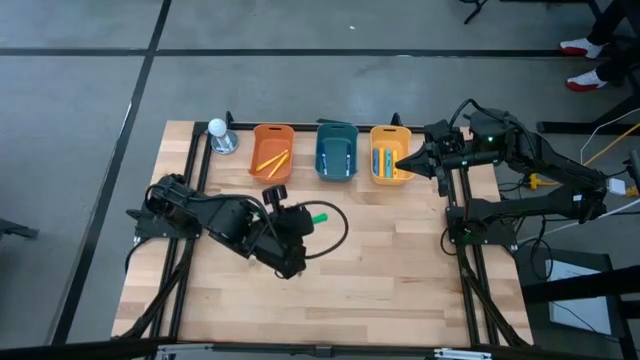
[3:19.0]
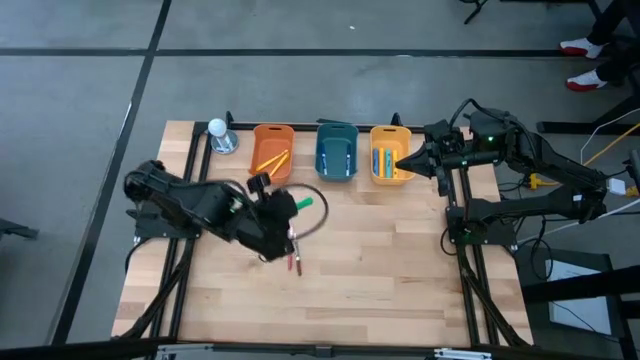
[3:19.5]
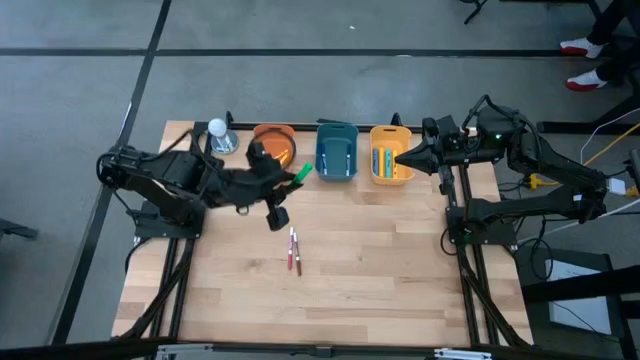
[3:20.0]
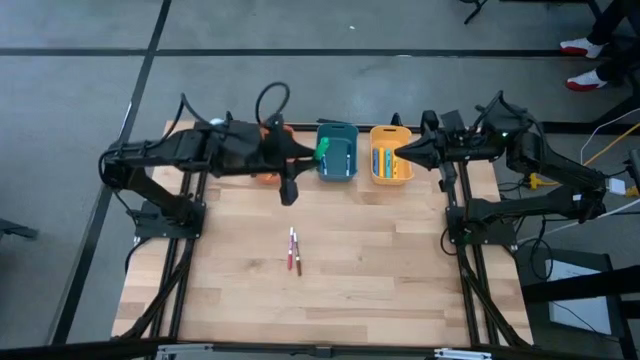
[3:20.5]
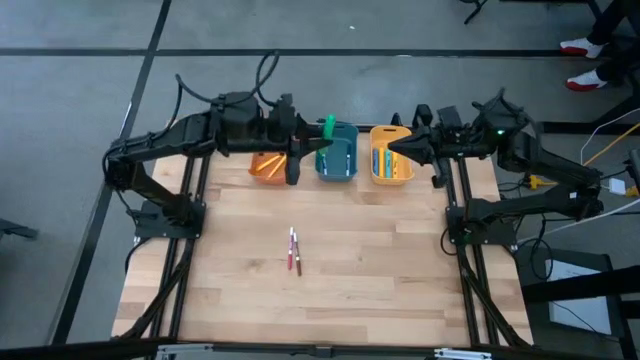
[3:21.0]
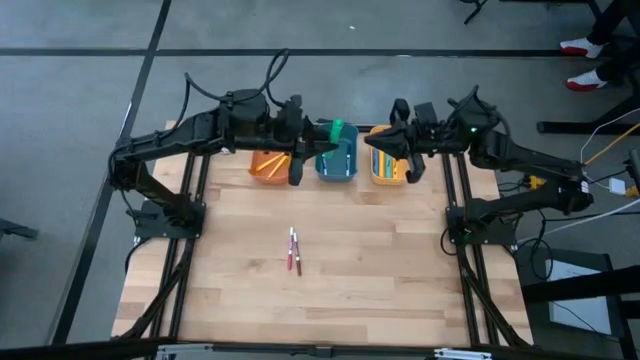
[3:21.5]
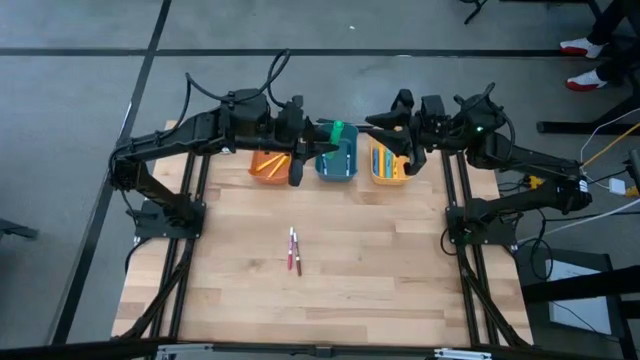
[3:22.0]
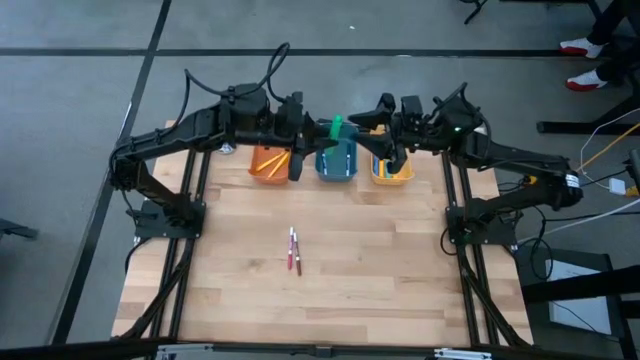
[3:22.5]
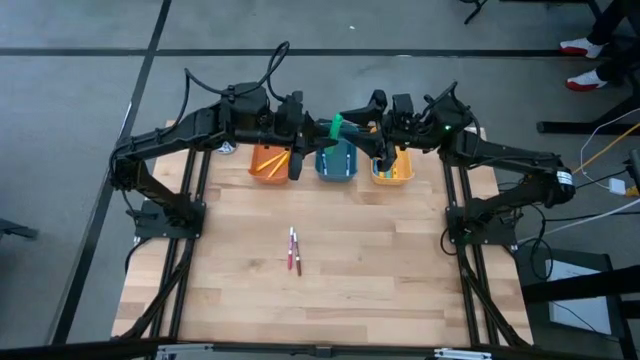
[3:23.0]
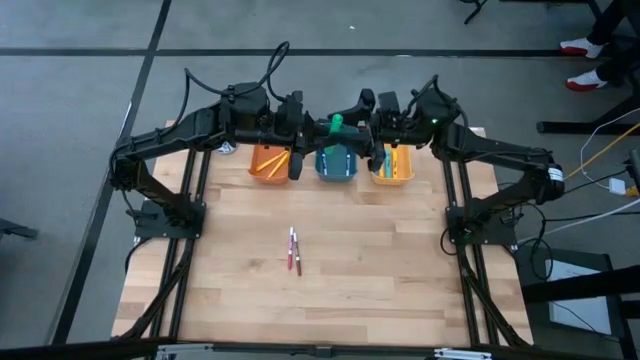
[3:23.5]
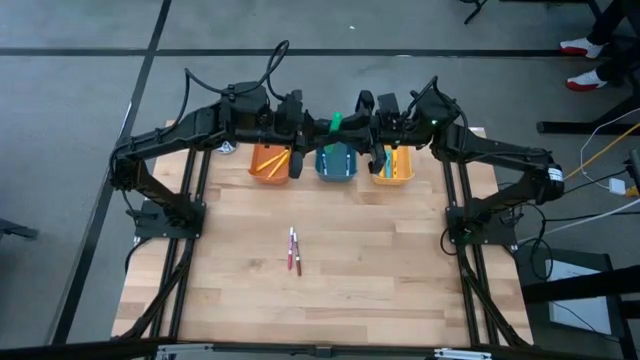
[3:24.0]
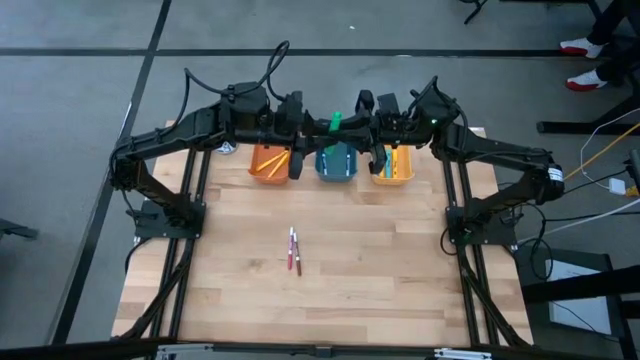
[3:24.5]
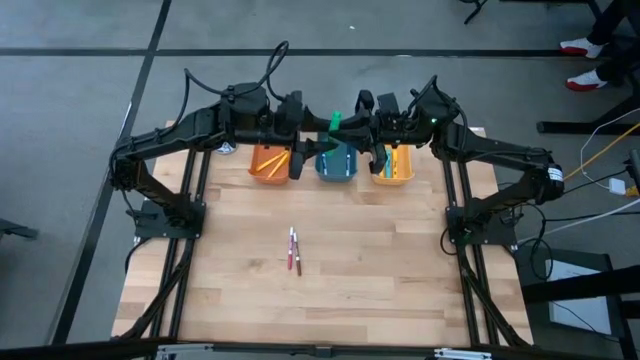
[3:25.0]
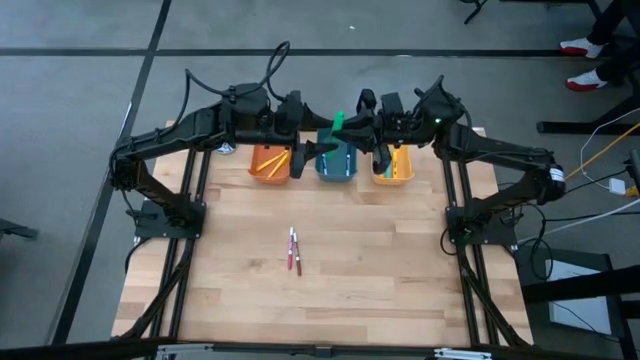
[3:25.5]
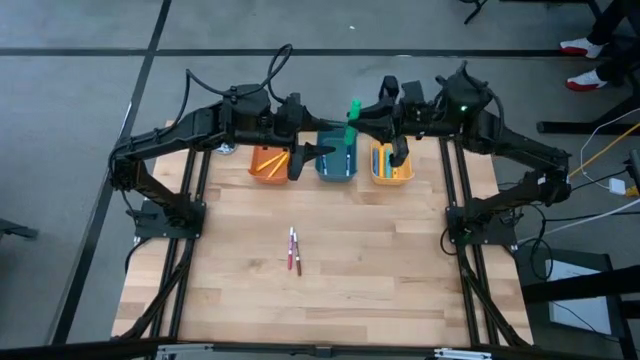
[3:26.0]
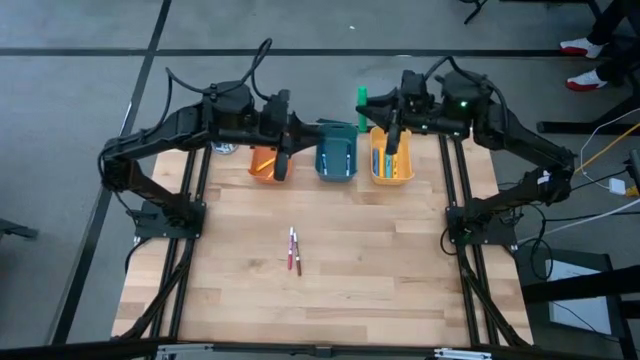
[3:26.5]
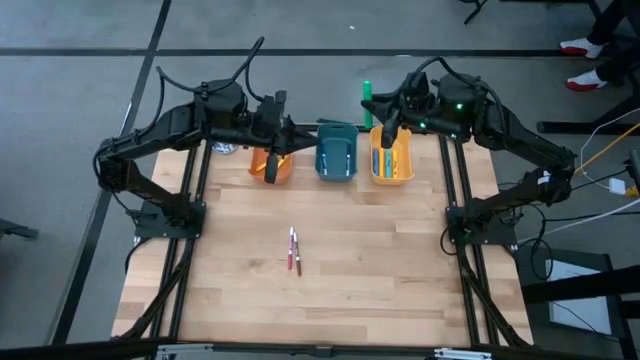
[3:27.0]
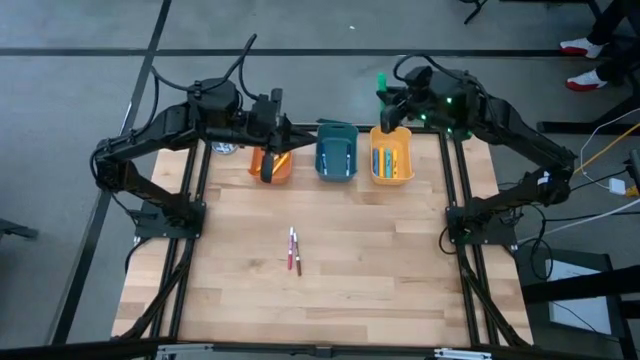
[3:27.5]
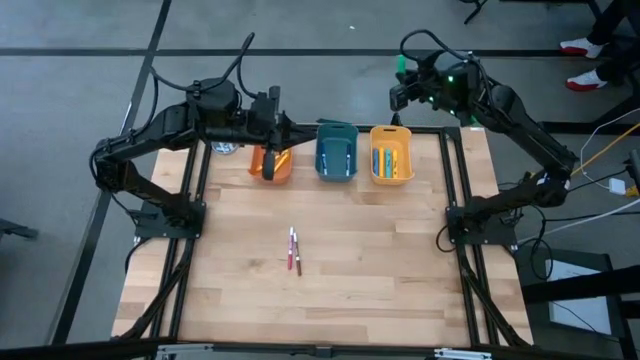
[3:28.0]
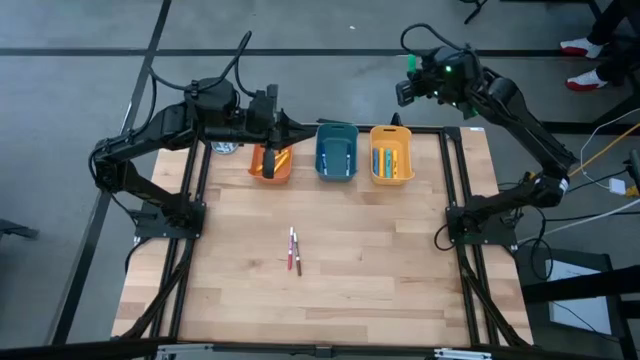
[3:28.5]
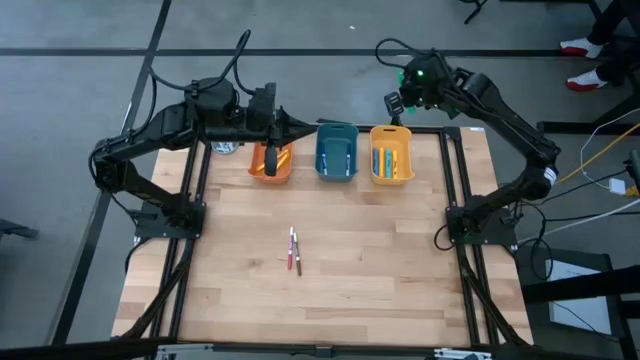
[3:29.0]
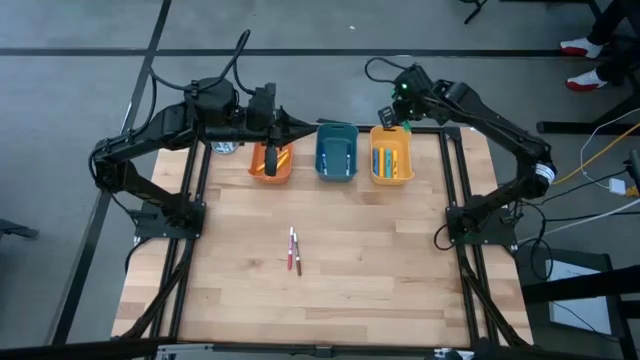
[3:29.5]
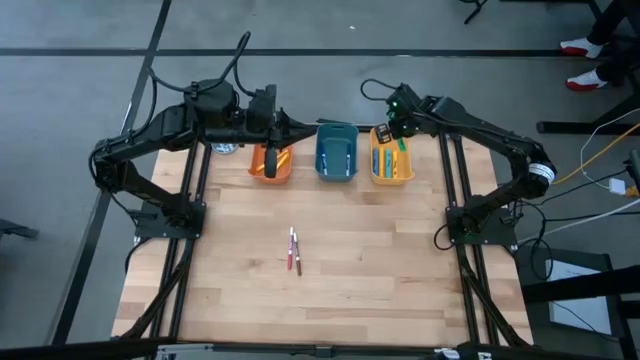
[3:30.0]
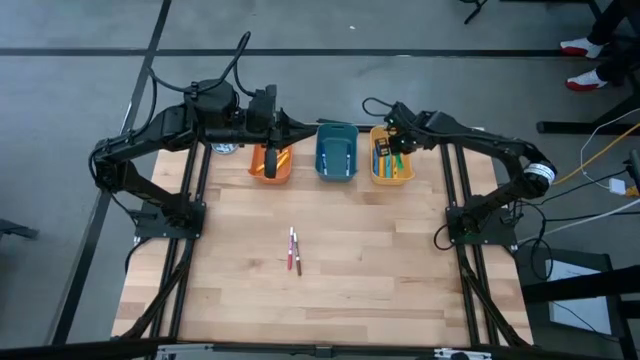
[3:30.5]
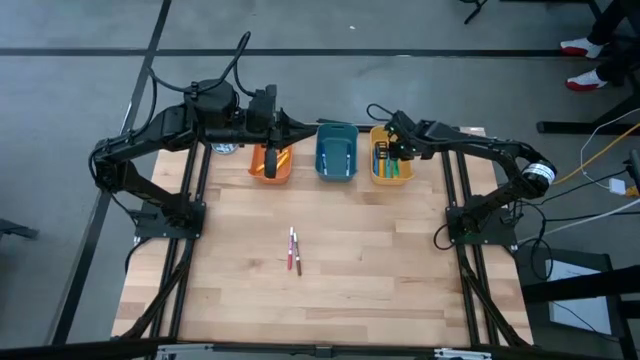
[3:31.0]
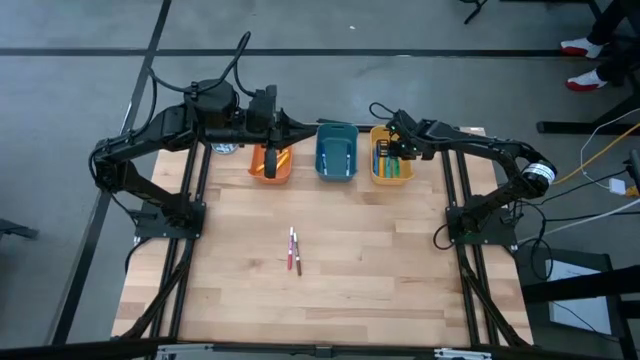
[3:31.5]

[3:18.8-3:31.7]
Task: Pick & Place Markers
Put the green highlighter pen into the yellow bin

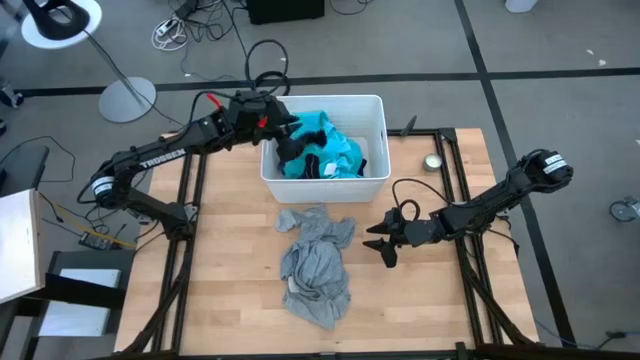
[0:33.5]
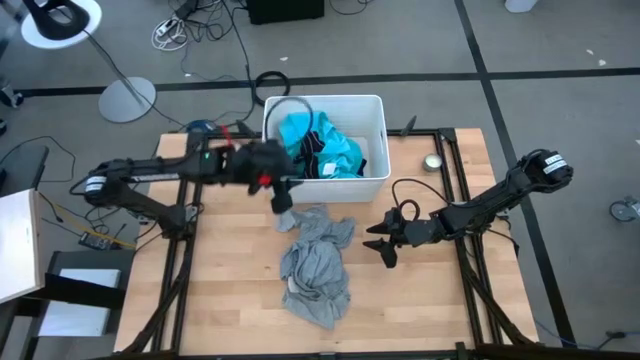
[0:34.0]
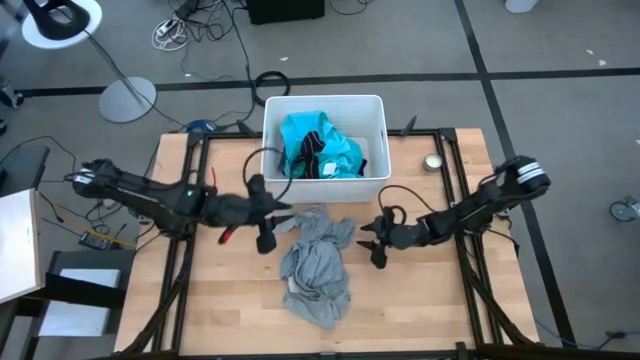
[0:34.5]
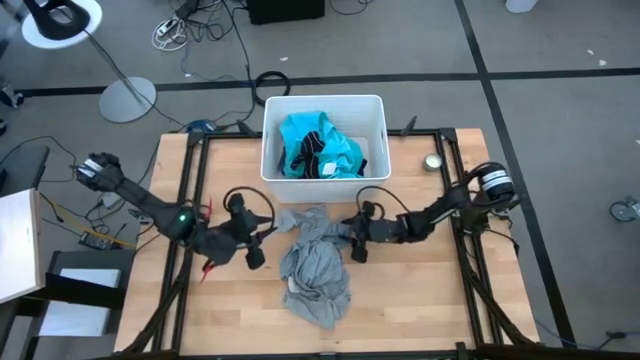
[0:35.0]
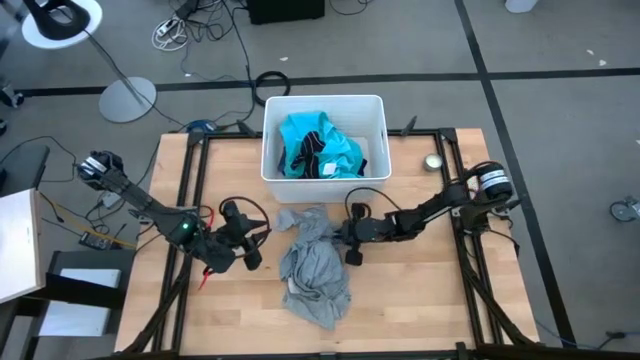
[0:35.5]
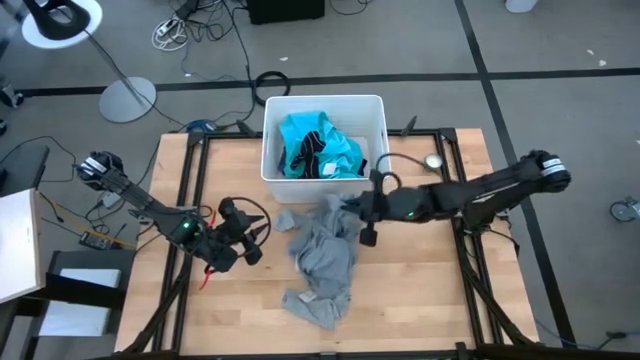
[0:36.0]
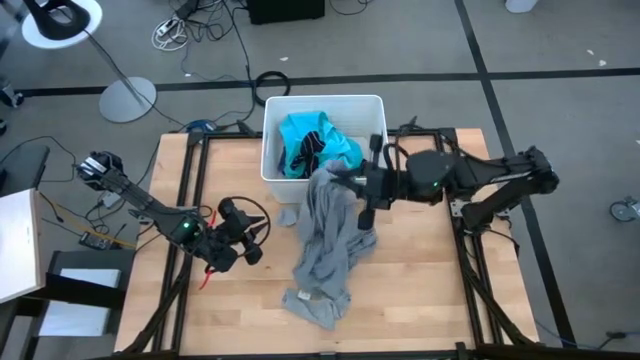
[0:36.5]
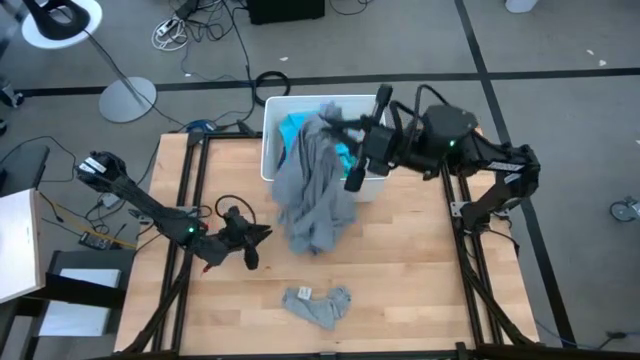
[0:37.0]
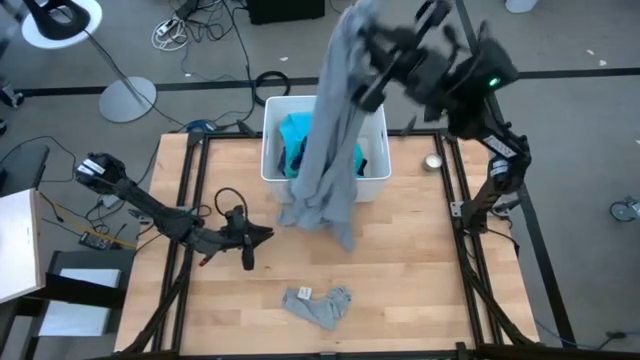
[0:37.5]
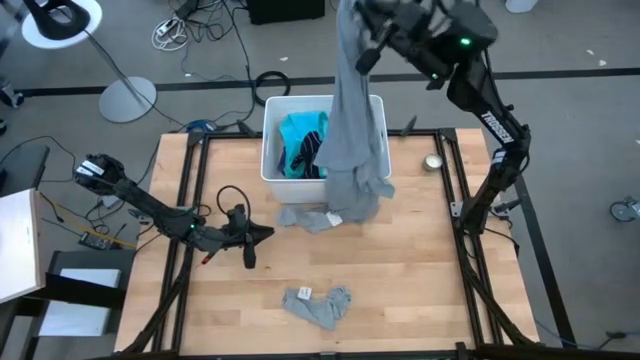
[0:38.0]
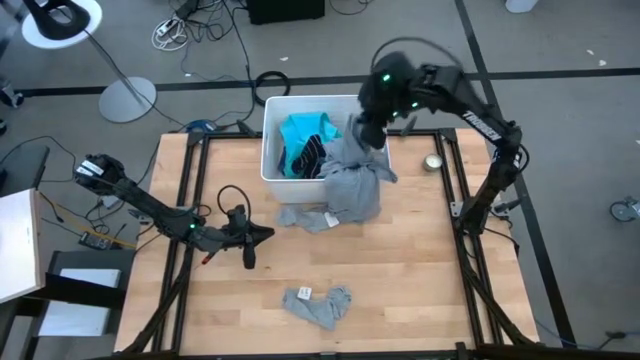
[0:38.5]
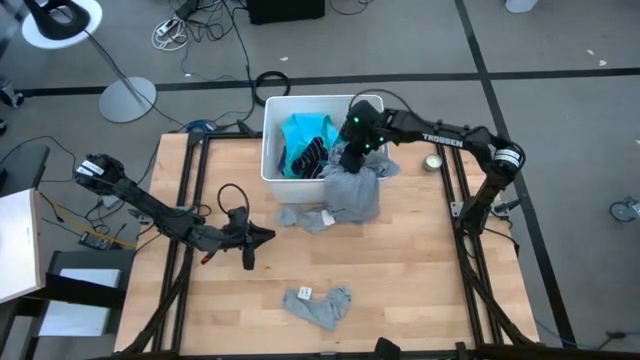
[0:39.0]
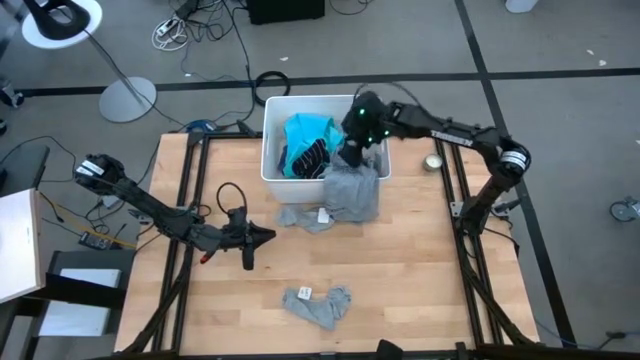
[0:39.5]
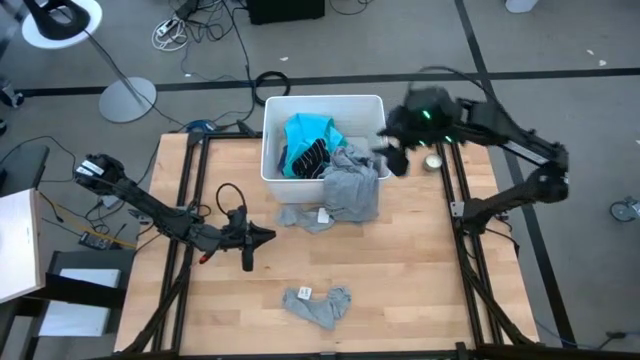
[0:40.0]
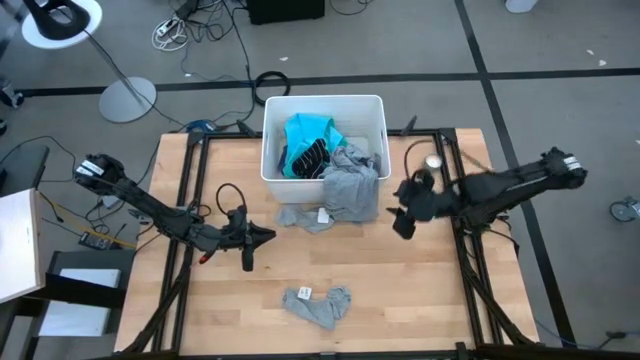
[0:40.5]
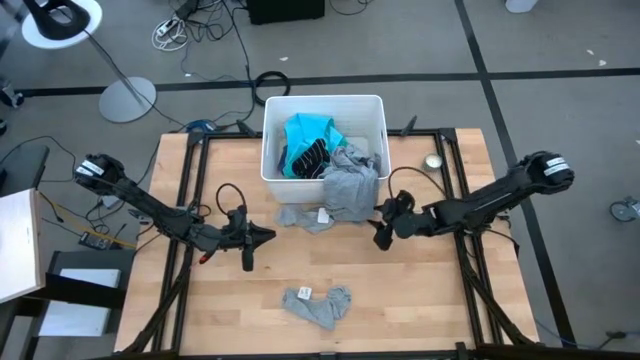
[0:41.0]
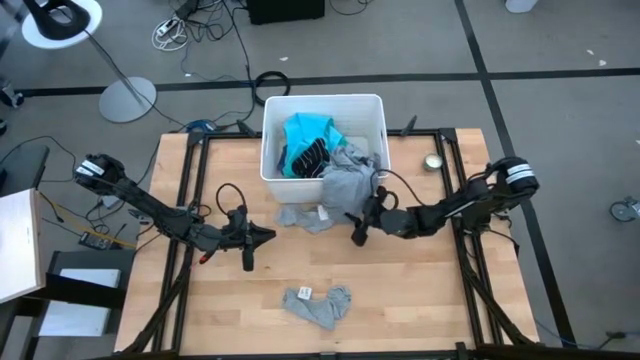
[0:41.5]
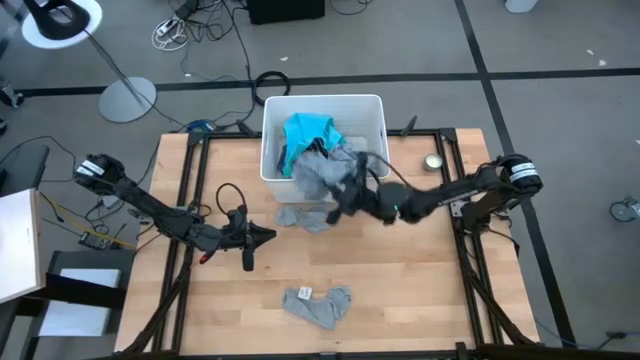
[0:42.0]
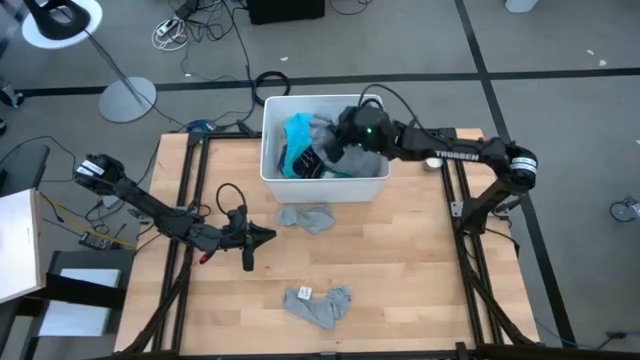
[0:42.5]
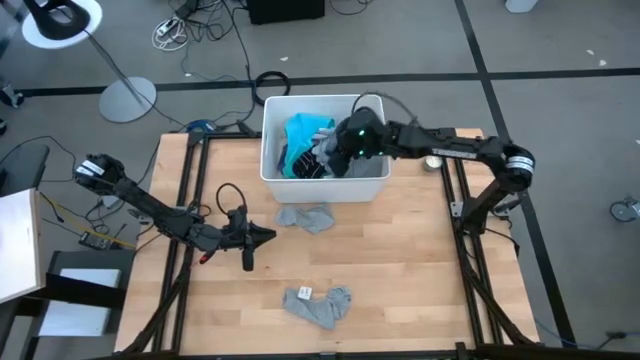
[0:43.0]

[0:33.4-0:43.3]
Task: Sort clothes
Put the gray shirt into the white bin
